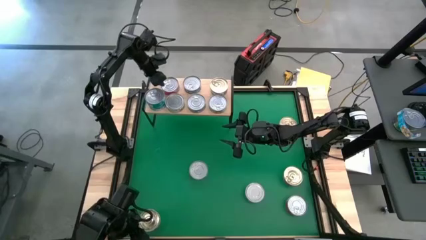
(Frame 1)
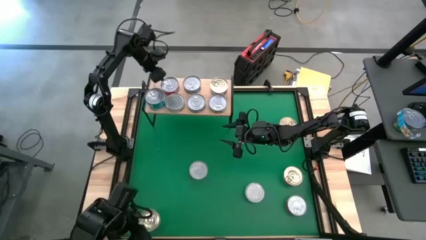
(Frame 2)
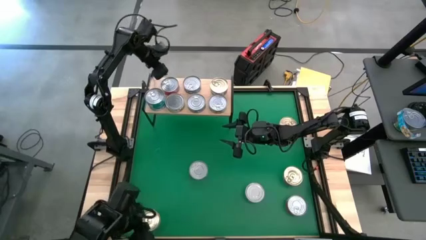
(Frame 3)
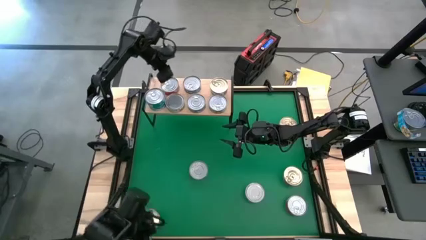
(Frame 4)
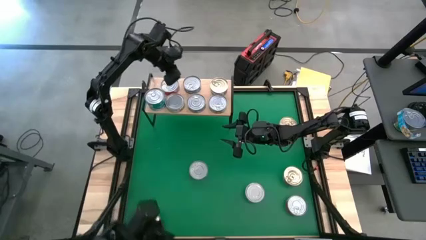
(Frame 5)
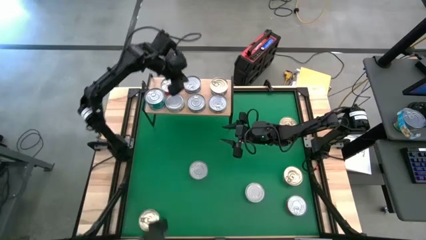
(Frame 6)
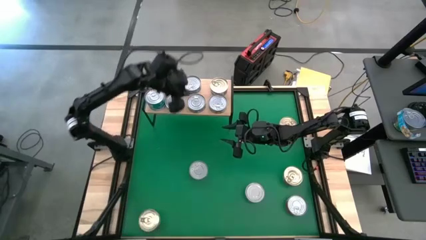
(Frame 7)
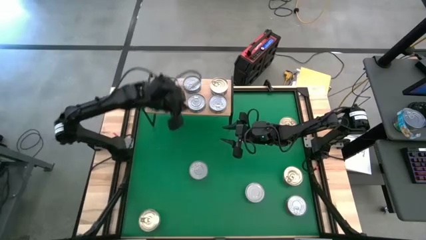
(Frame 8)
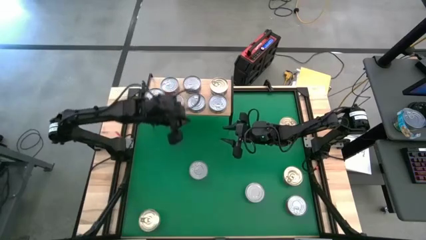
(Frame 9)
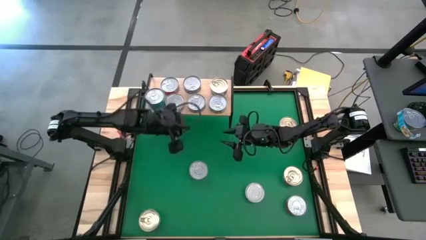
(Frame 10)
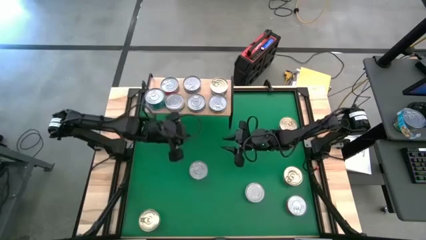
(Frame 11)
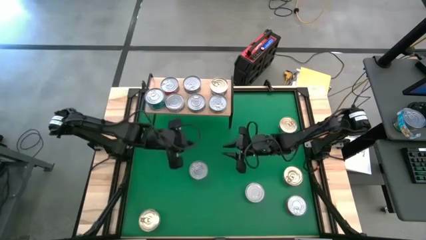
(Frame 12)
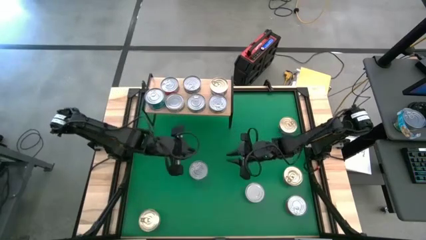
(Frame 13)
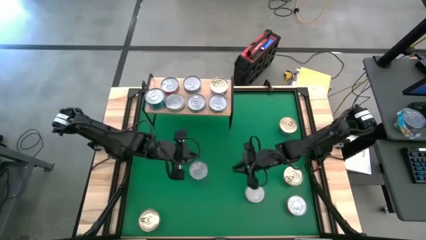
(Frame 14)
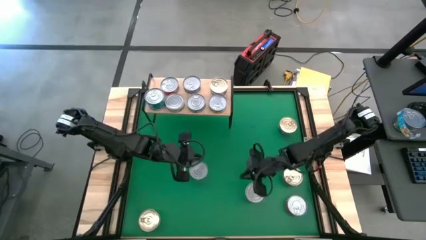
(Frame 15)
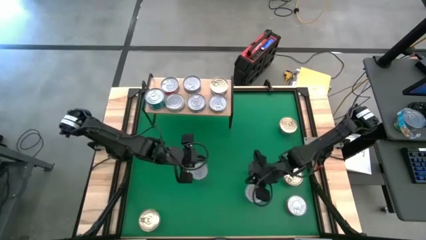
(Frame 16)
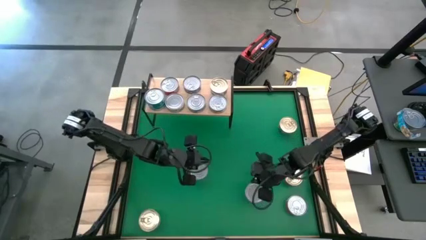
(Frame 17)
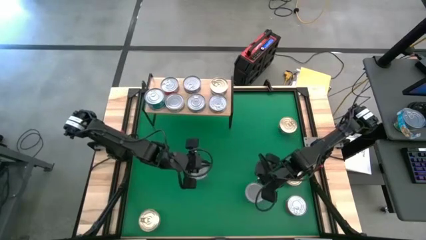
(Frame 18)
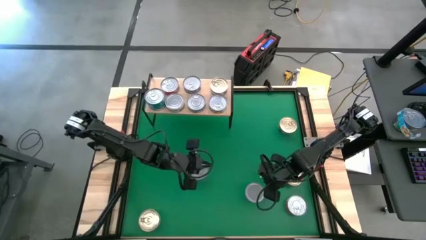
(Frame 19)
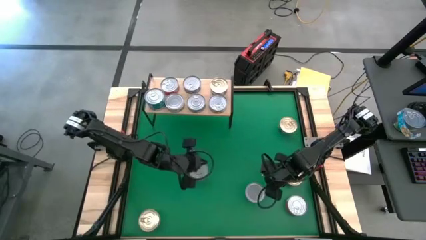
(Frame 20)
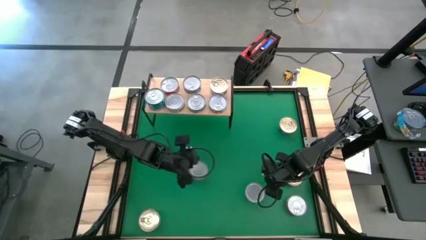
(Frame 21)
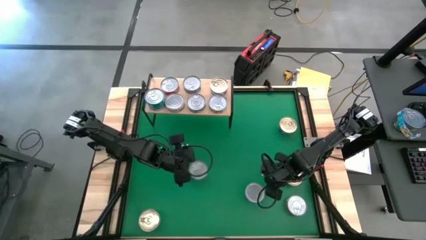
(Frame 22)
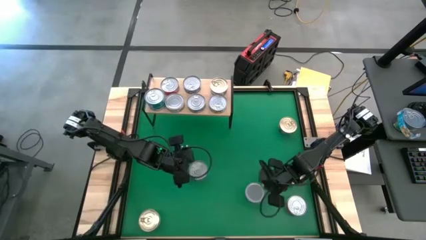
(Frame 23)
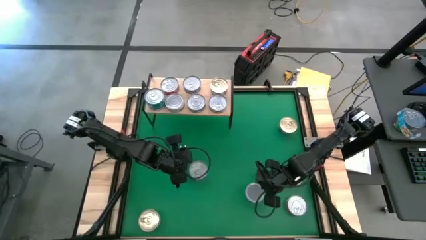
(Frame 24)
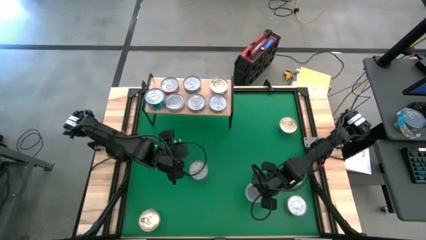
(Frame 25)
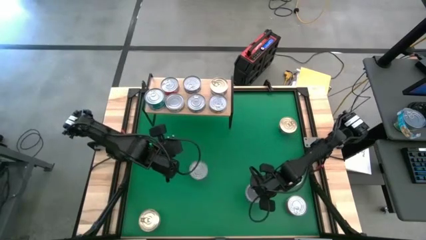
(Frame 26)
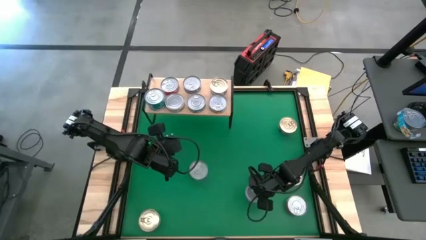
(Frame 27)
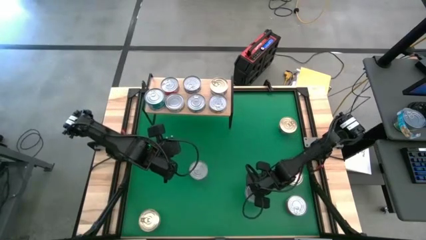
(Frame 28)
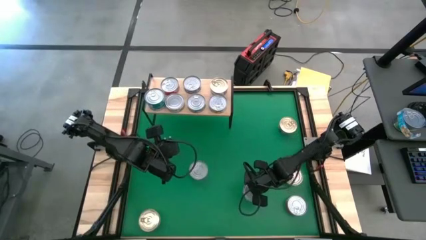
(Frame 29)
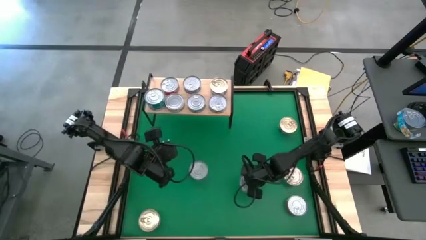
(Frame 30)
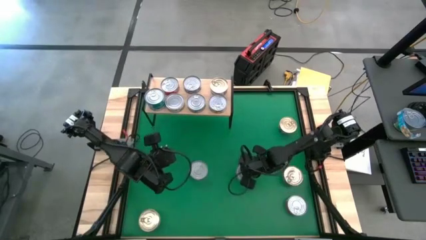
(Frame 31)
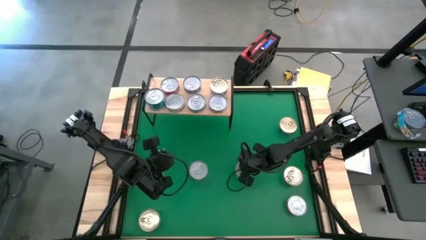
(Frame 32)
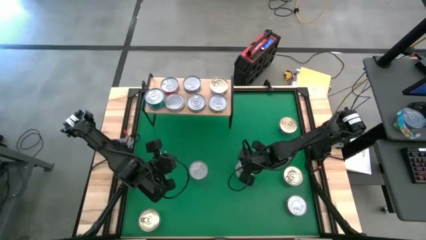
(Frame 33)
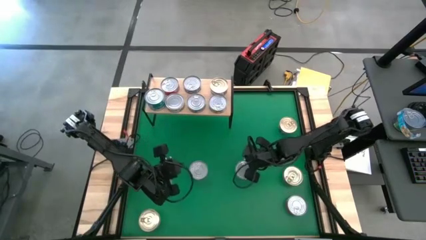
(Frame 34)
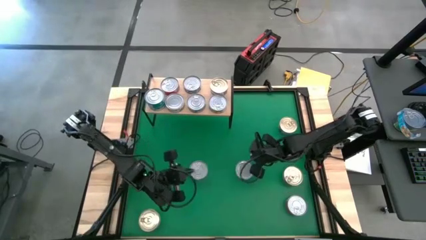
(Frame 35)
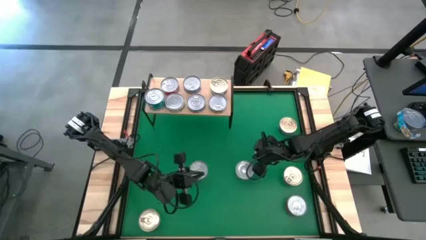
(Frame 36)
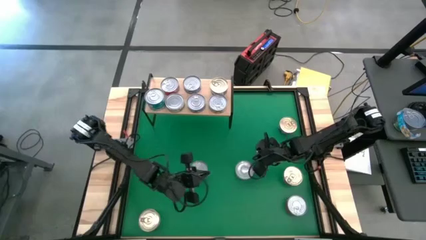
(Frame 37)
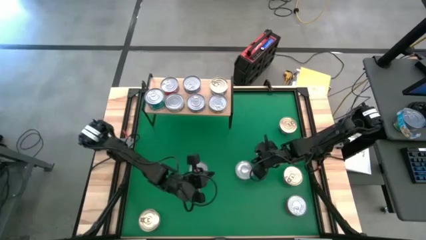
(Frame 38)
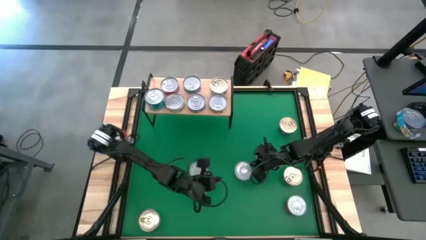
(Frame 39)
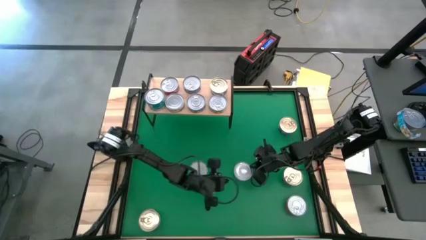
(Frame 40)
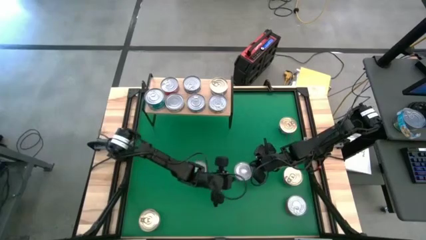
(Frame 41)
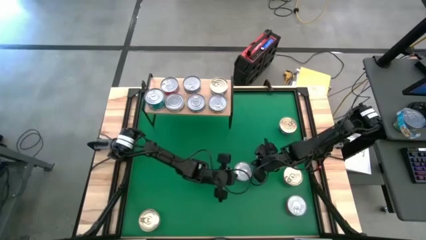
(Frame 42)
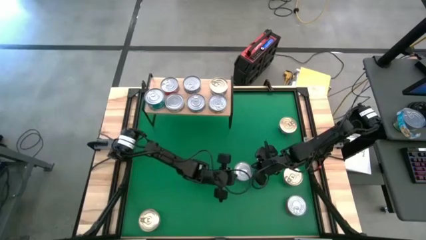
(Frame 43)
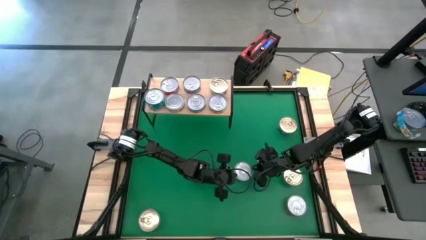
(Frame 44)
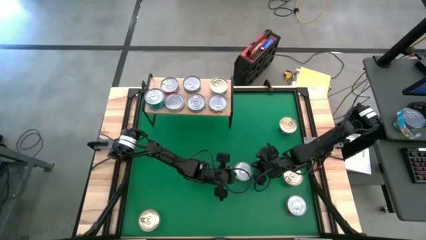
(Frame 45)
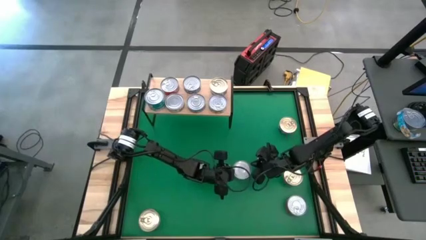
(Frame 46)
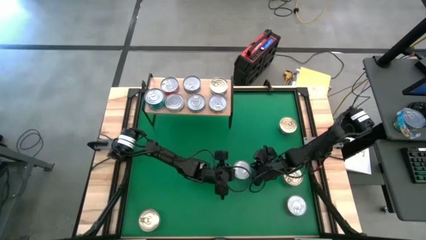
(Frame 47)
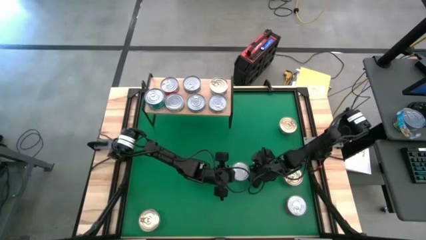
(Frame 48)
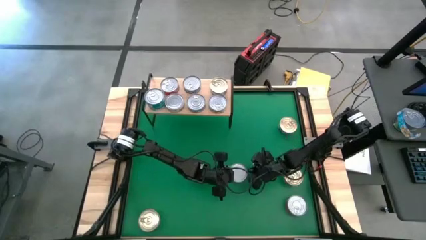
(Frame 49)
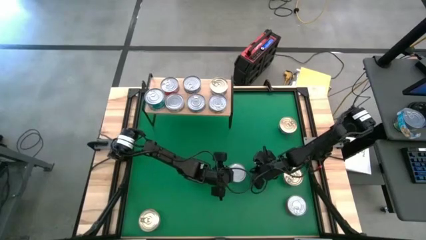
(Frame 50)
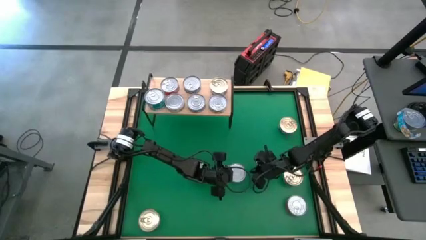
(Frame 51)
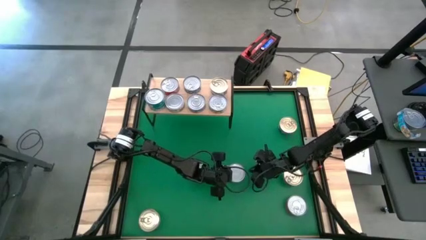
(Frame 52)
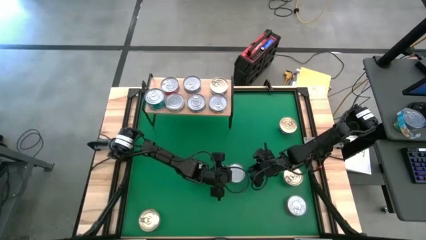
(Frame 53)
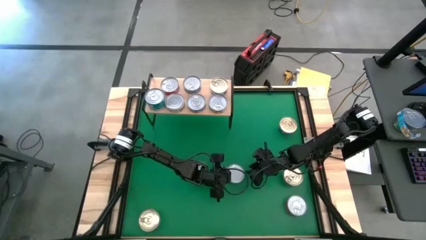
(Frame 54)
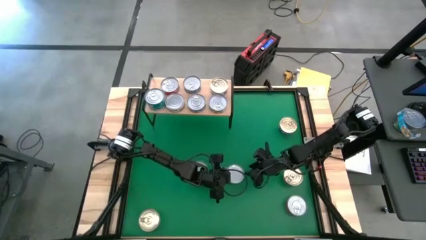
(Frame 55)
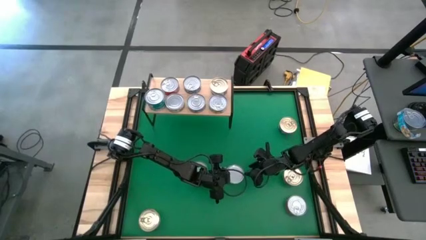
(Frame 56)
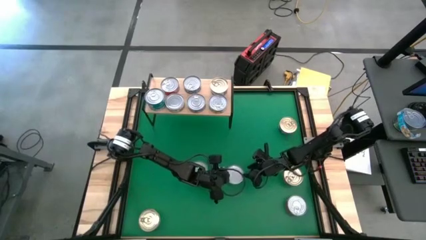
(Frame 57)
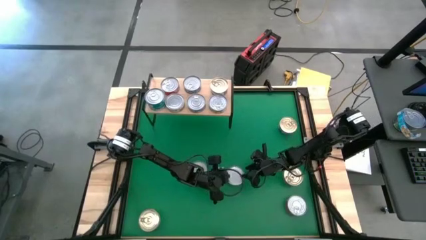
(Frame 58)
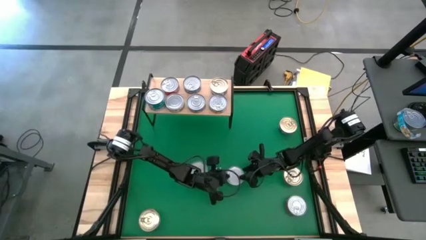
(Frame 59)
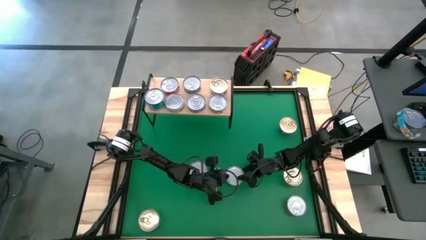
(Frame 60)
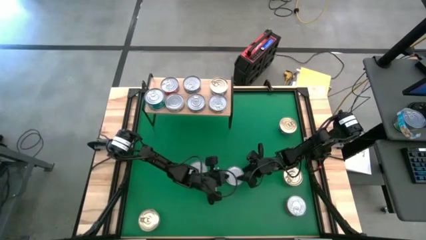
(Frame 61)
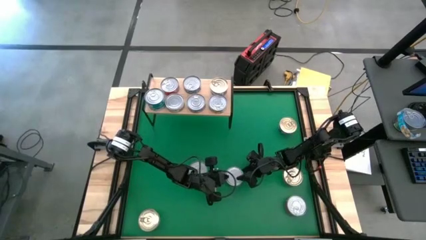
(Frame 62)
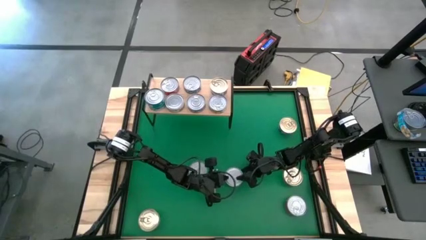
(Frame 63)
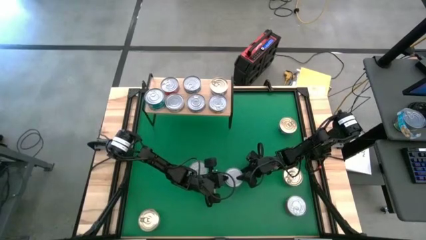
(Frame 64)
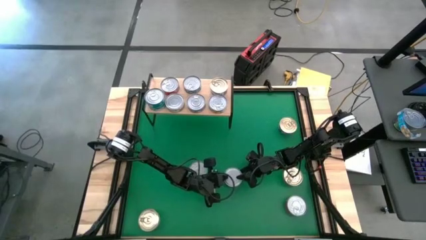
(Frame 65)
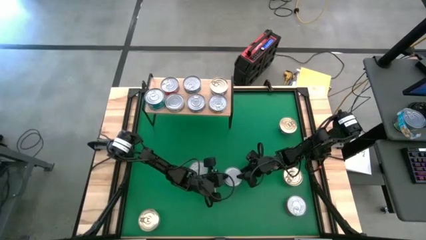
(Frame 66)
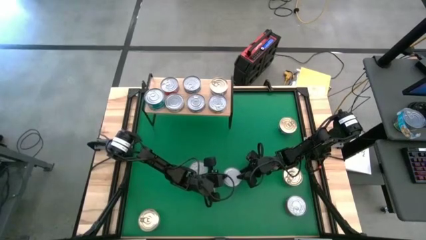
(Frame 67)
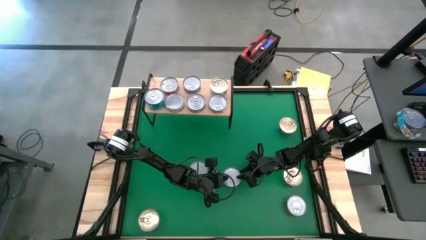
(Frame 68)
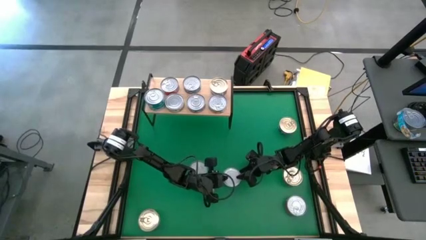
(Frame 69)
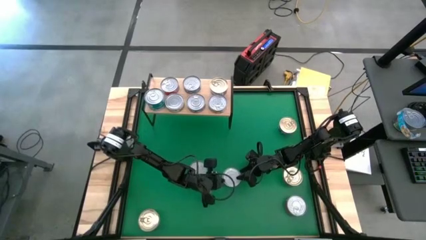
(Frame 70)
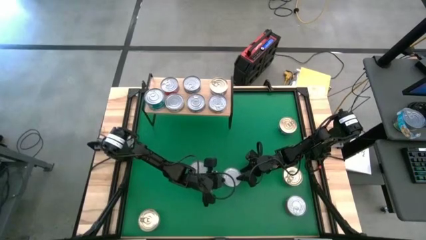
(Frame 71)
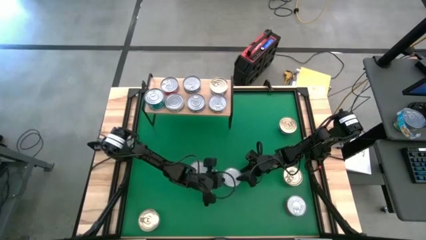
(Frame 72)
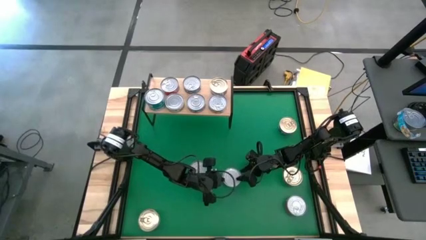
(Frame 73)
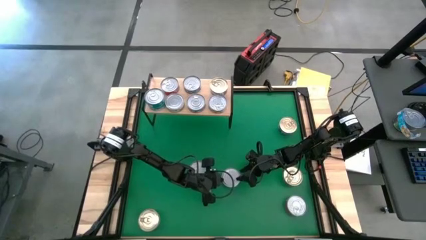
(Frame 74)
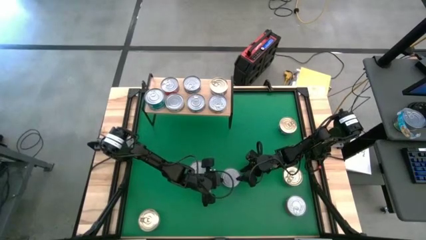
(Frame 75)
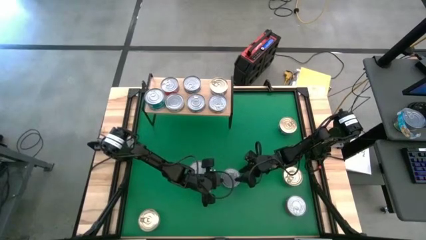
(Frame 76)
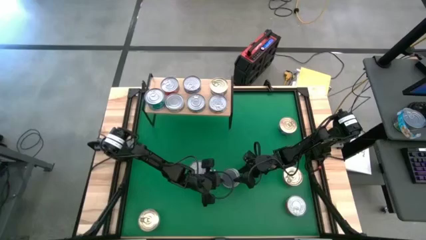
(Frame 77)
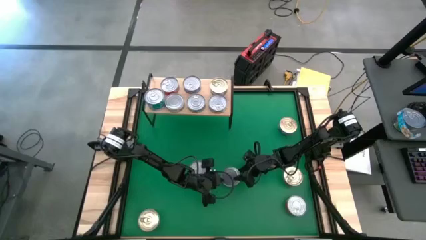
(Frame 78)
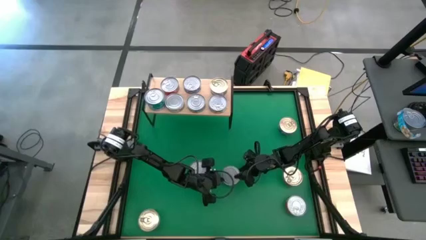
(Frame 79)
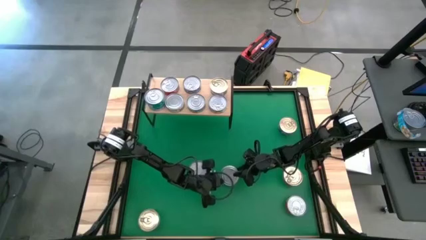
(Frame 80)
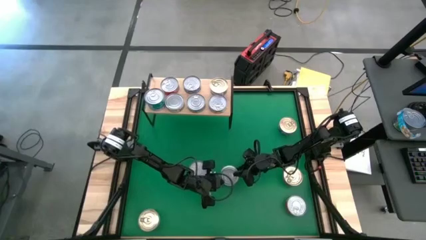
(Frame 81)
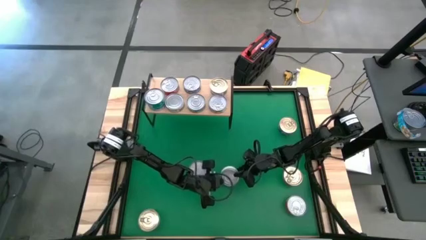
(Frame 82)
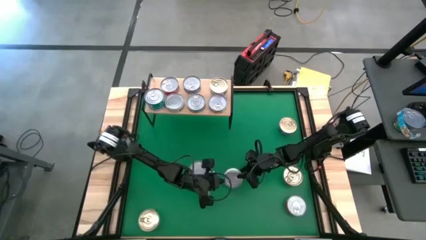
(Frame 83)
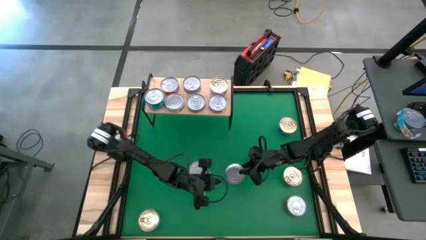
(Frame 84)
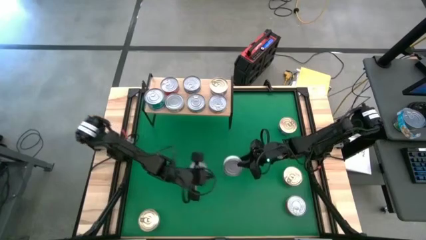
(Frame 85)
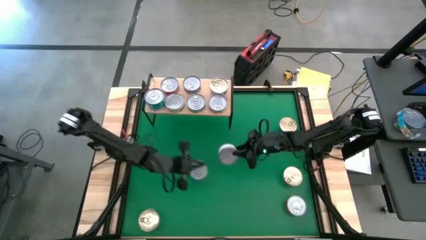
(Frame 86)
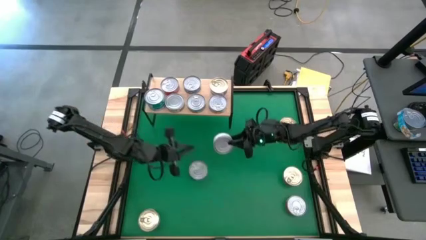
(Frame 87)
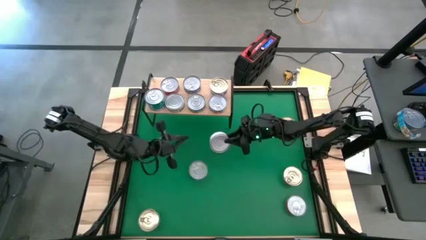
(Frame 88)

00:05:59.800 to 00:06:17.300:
Task: Stack canned seafood by type on shelf
Stack the white tuna can on top of the white tuna can on the shelf
